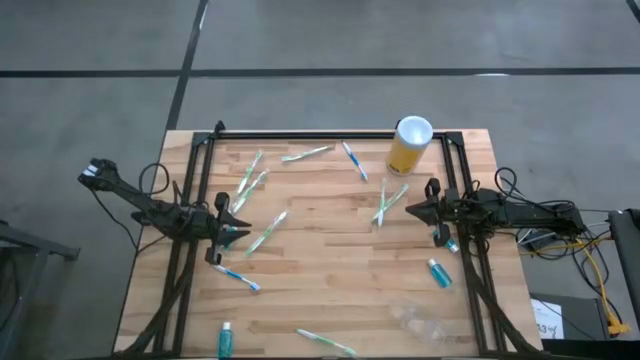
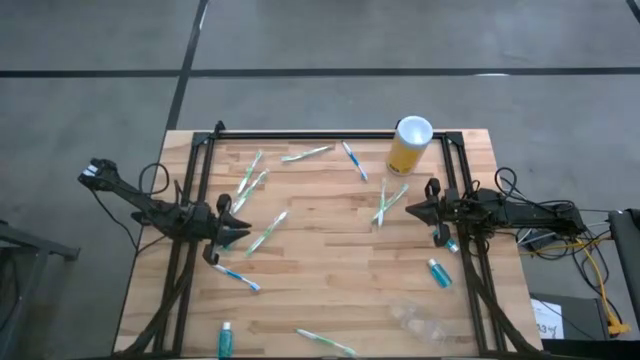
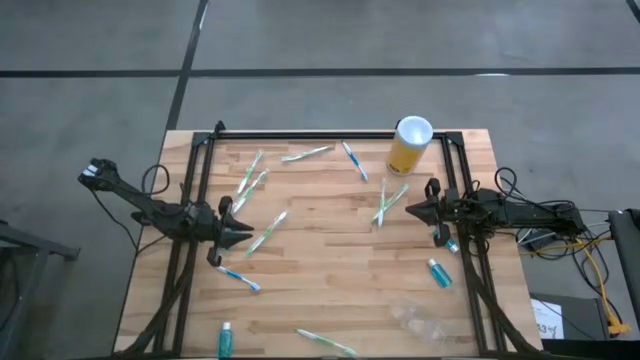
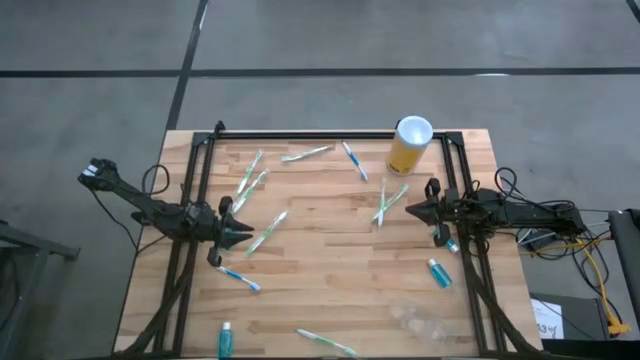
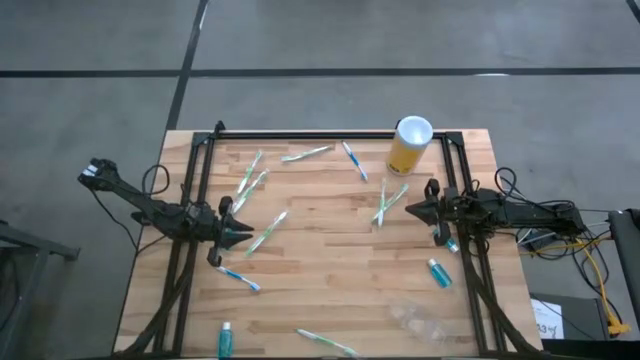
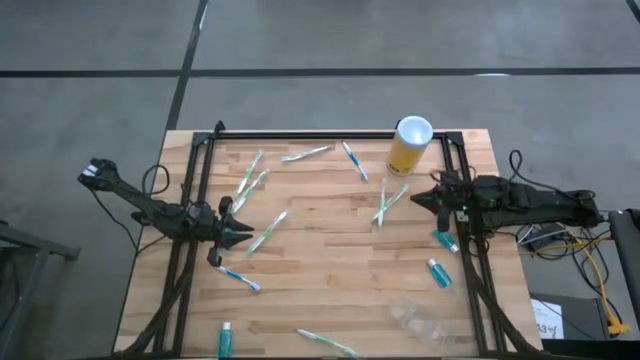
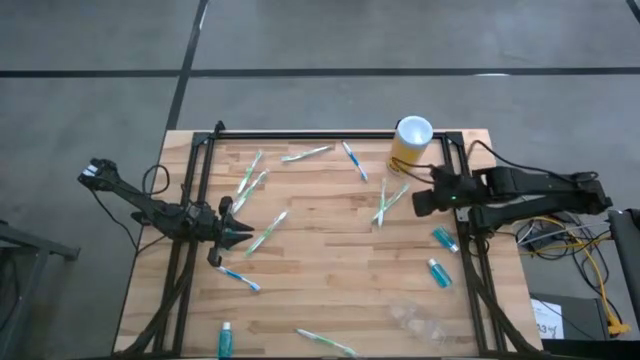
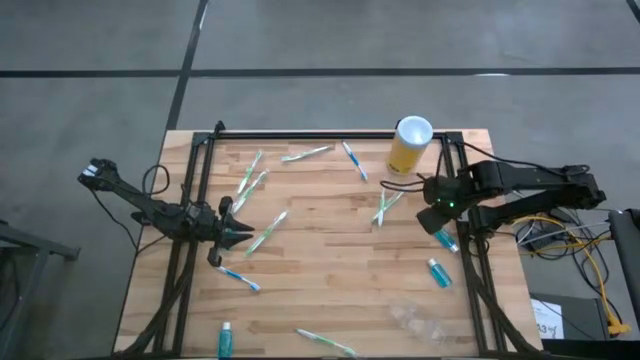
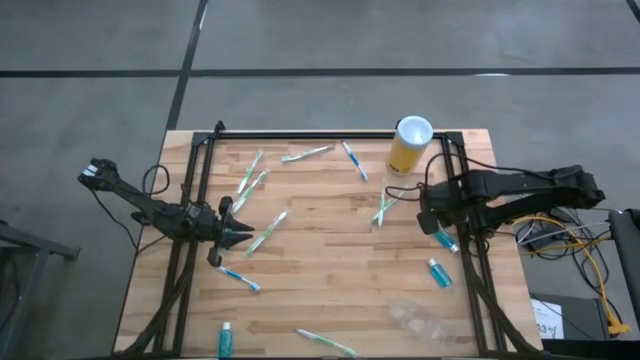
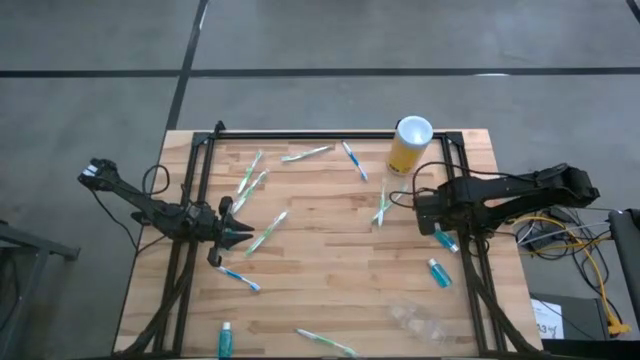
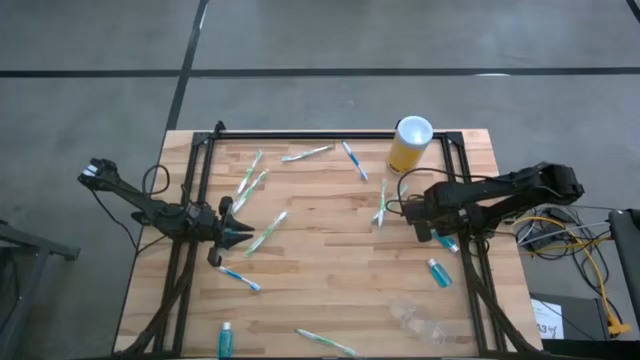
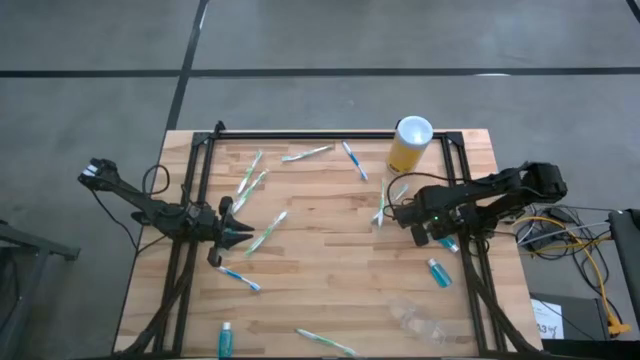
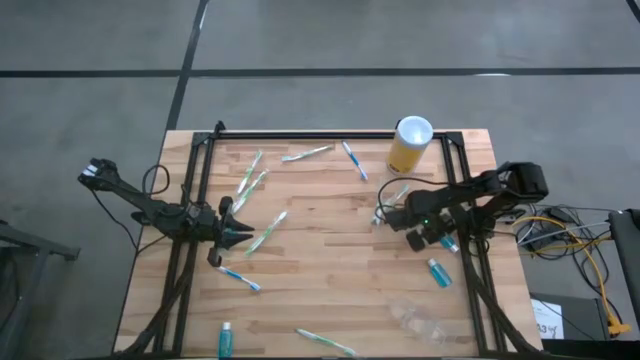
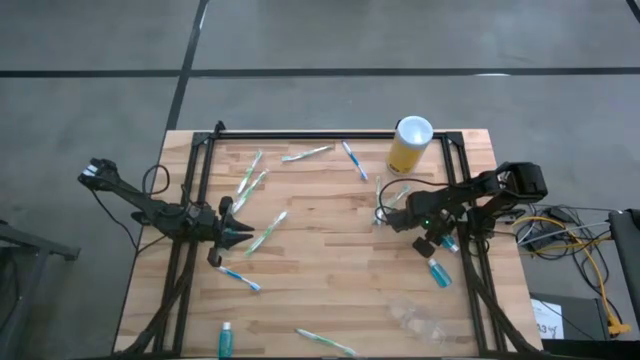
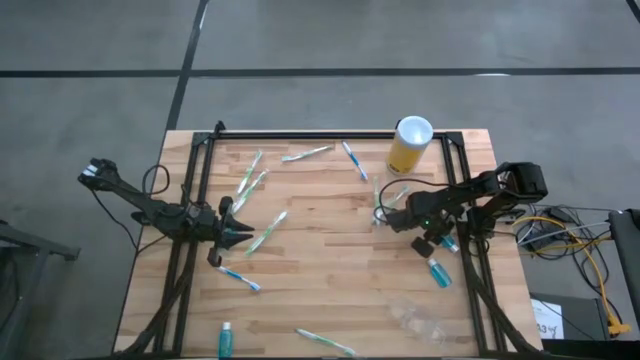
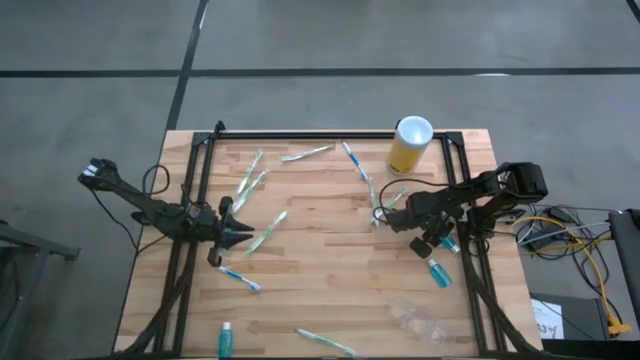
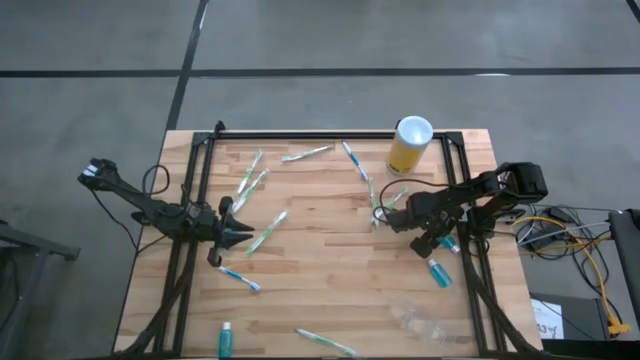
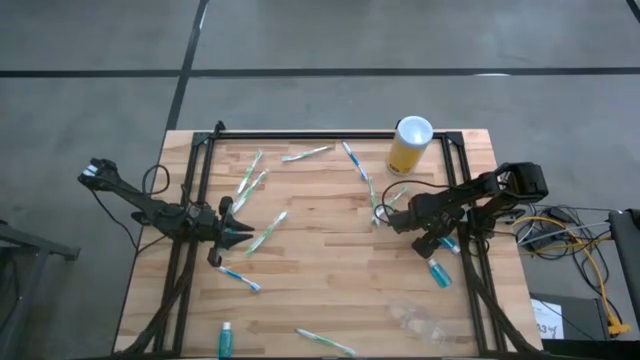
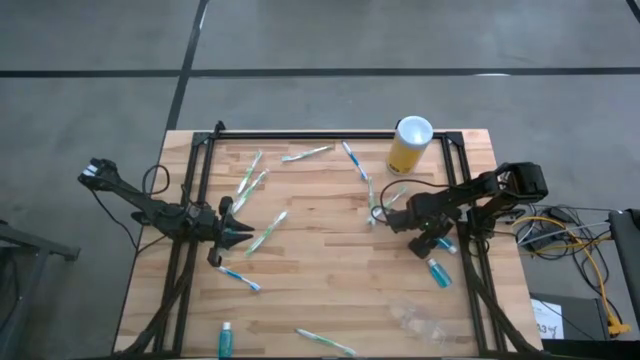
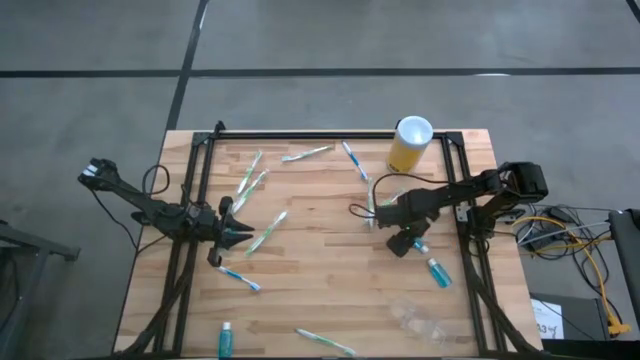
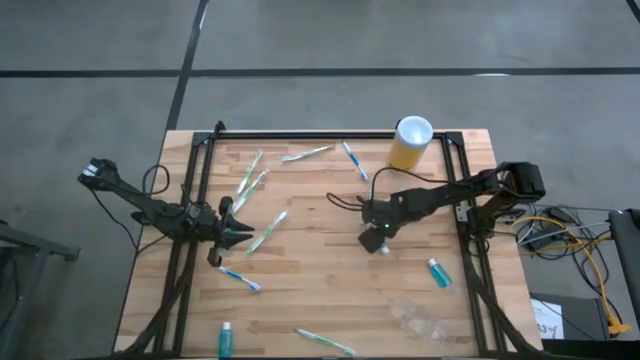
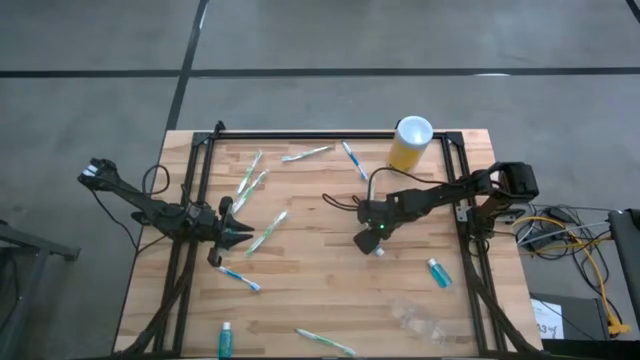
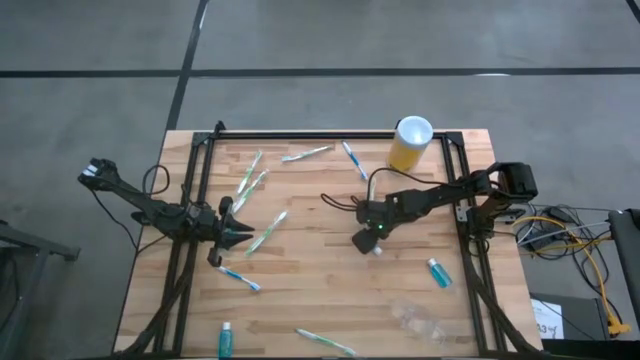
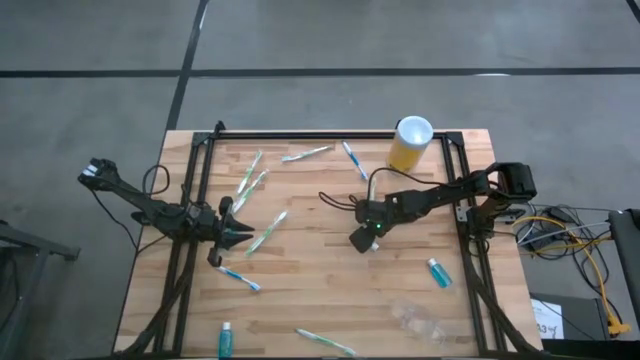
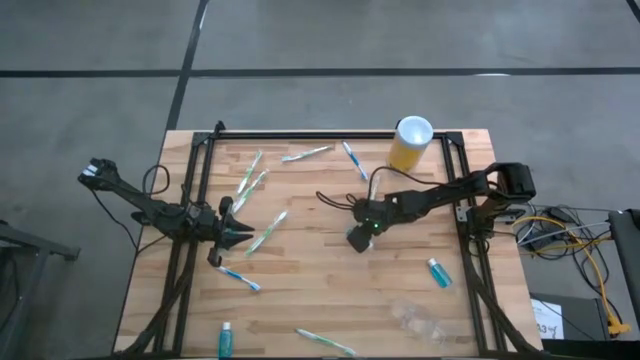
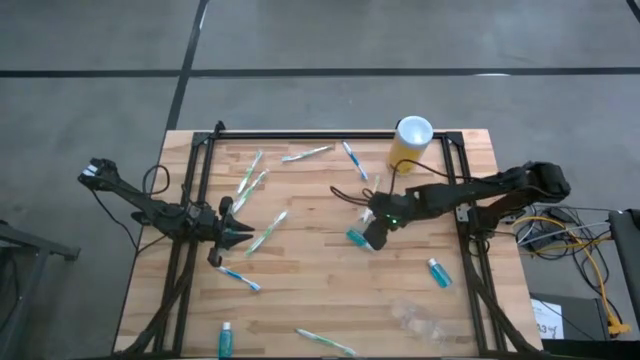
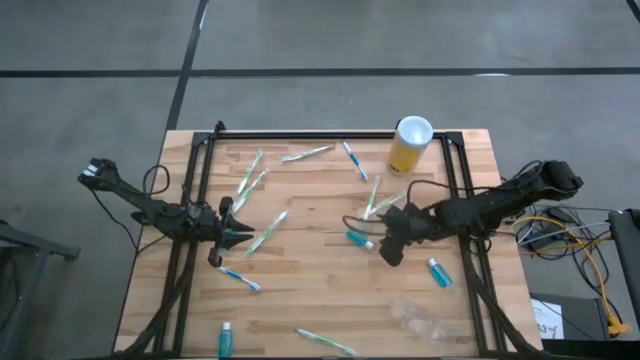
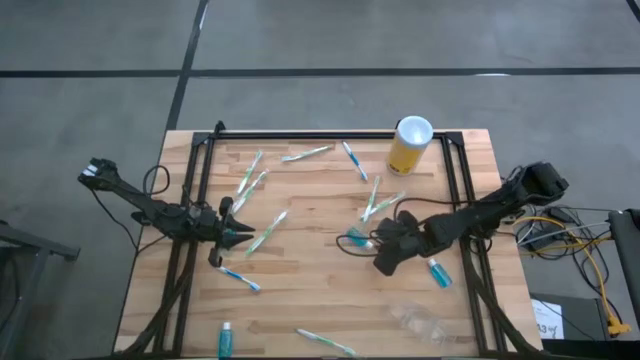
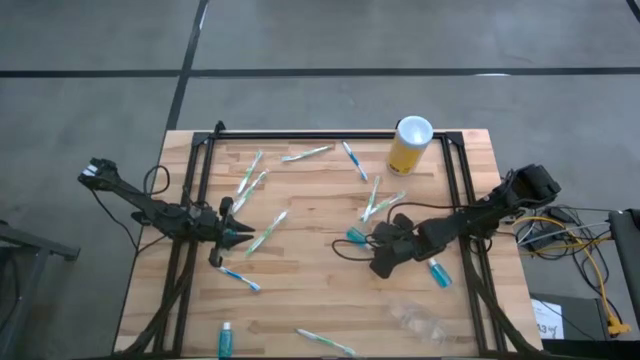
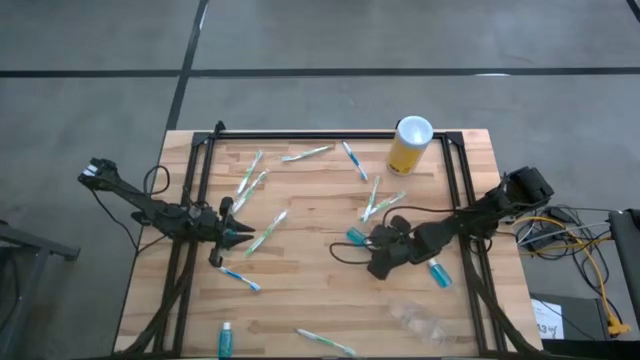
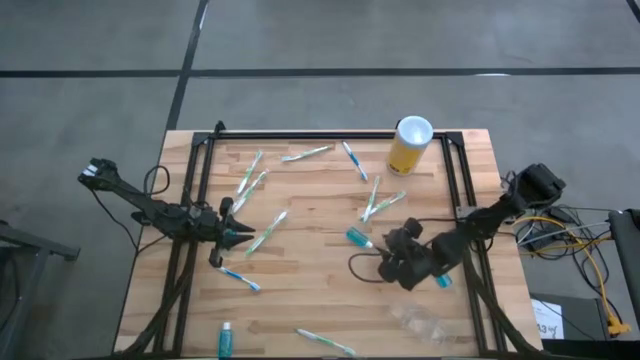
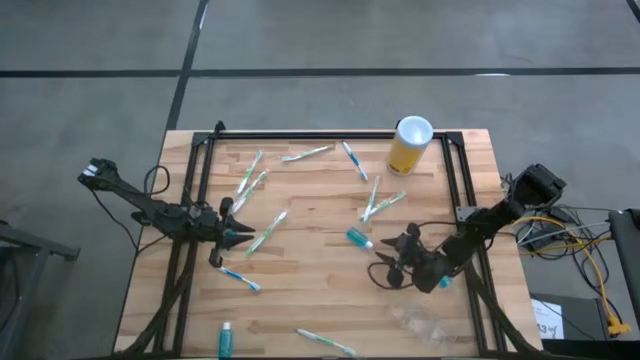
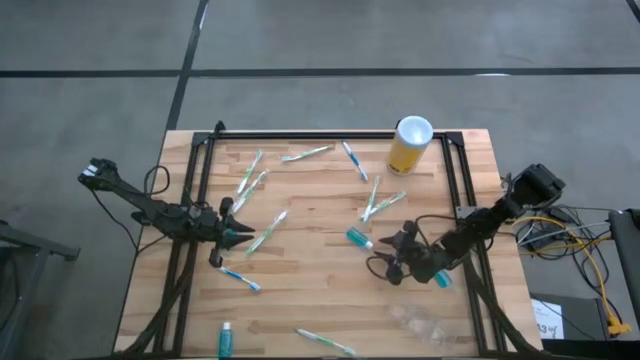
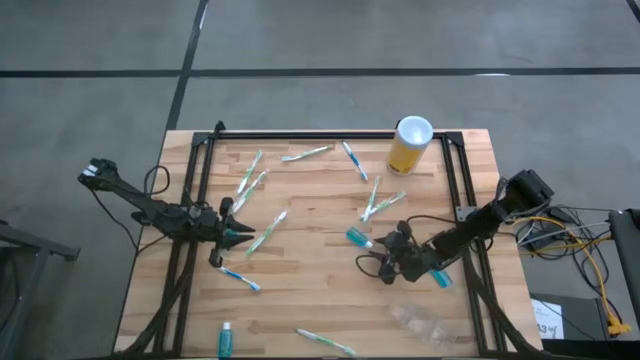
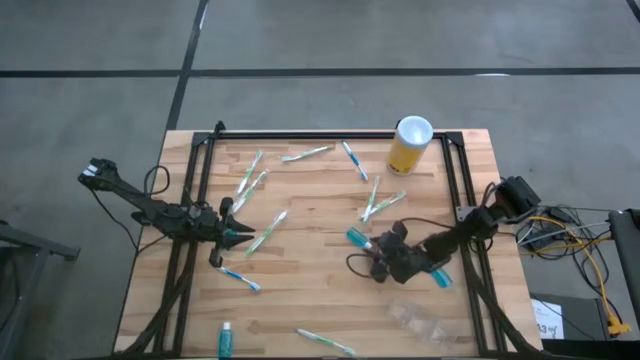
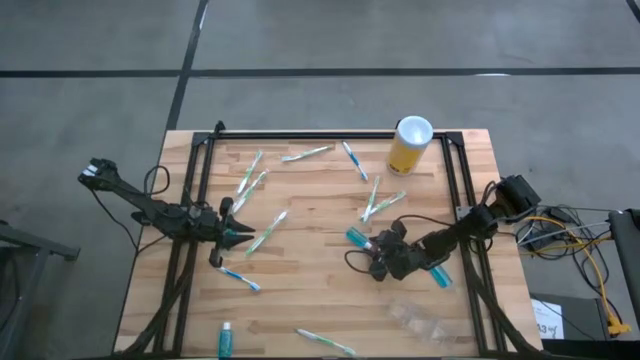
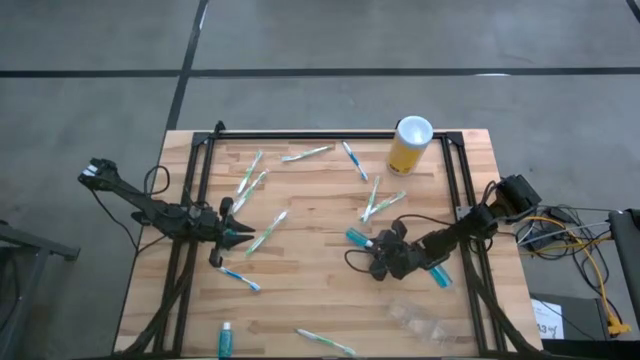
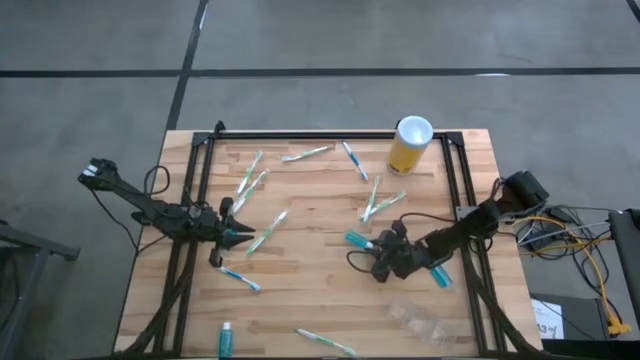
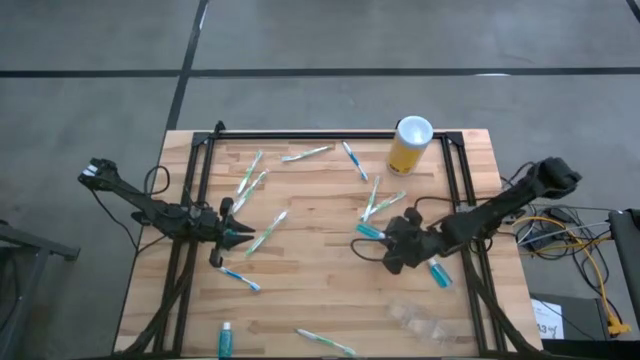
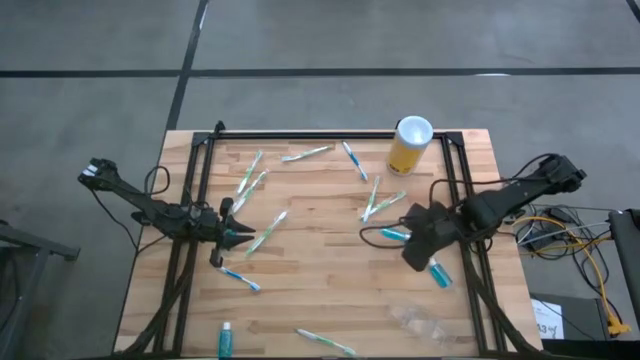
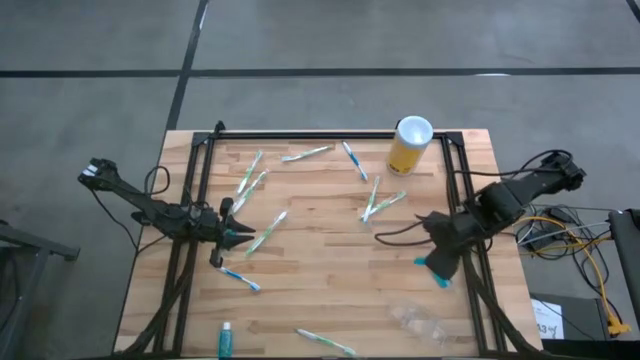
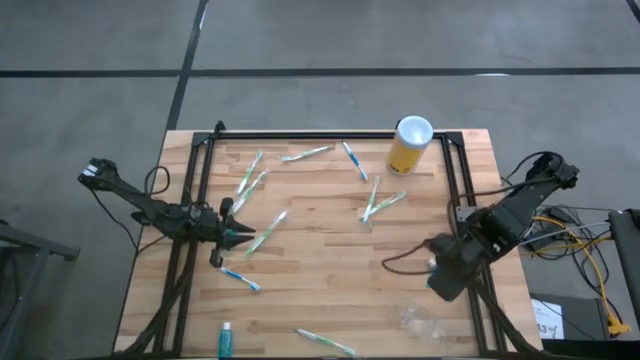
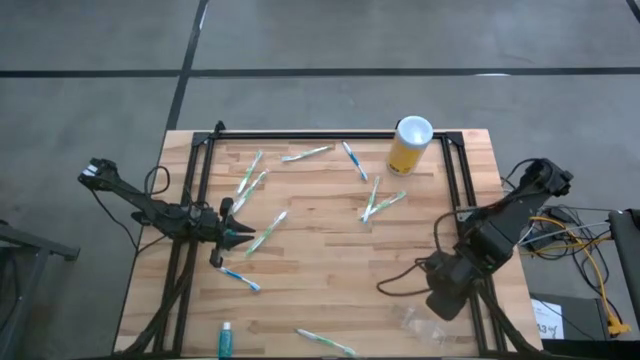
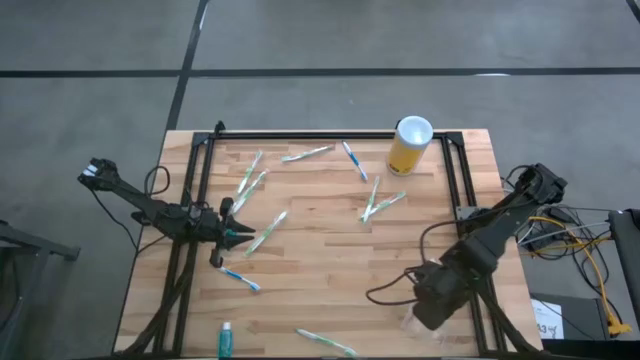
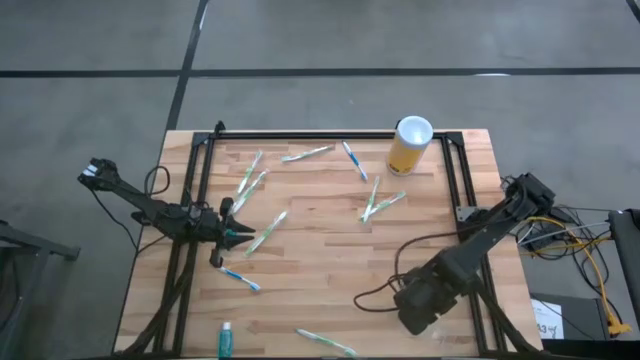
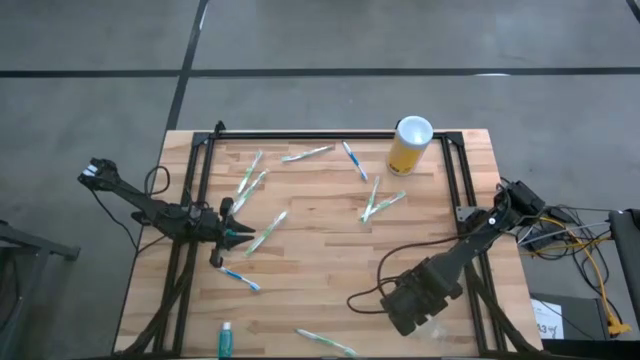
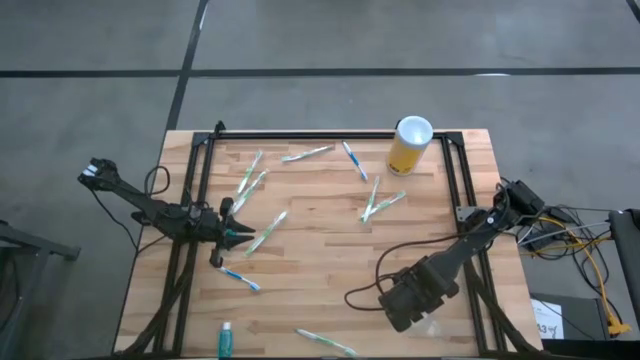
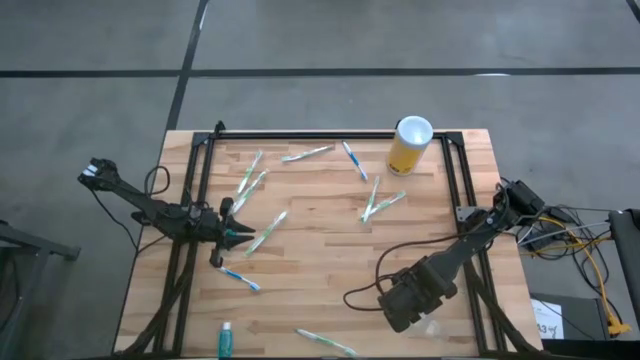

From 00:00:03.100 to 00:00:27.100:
Task: Pick & Place toothbrushing station
Put the blue mouthwash into the transparent organizer
